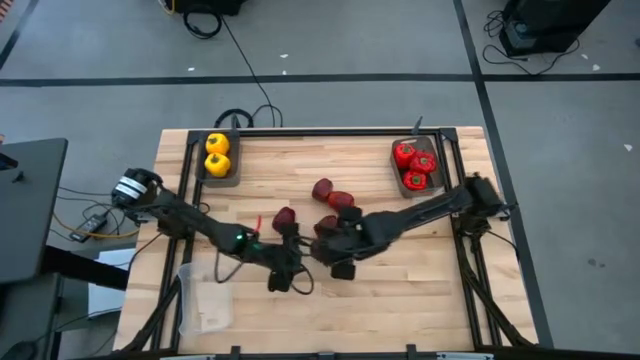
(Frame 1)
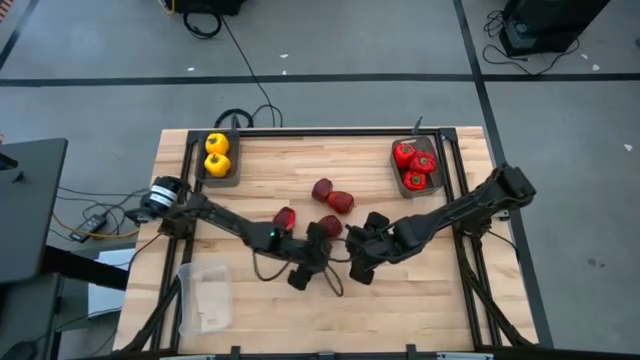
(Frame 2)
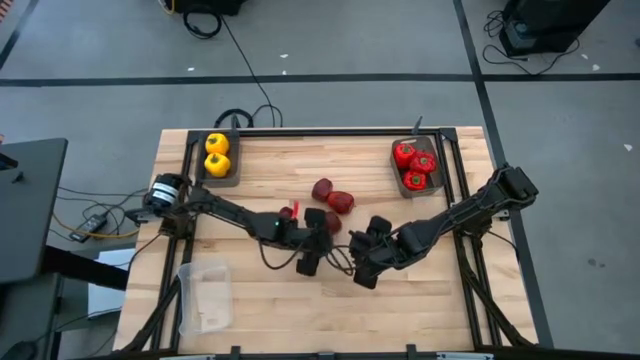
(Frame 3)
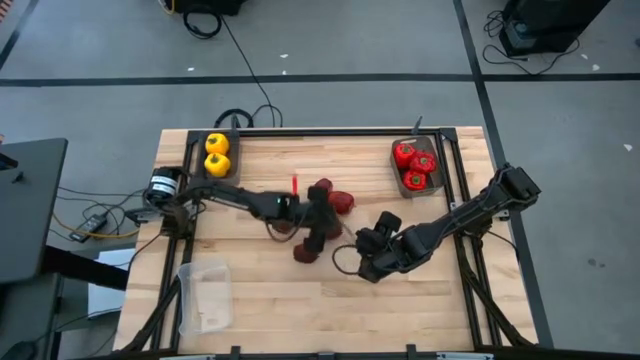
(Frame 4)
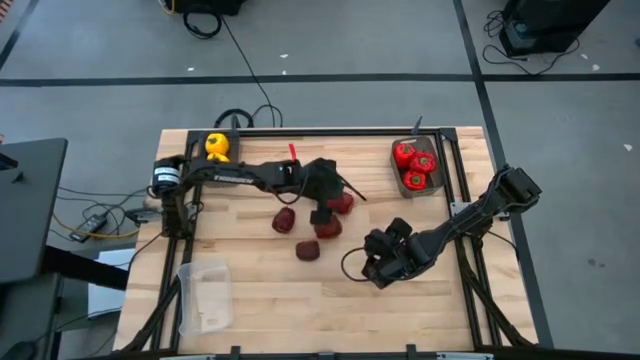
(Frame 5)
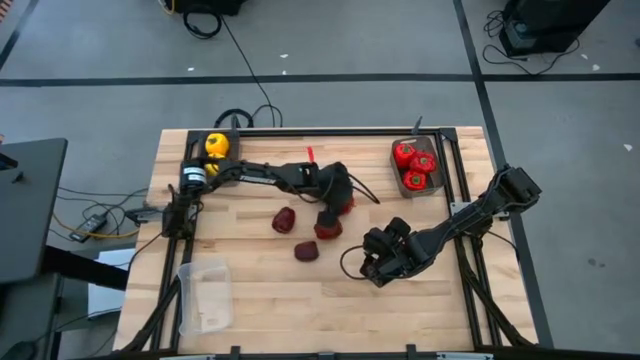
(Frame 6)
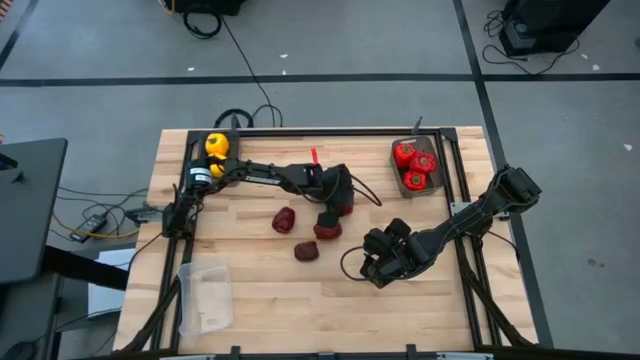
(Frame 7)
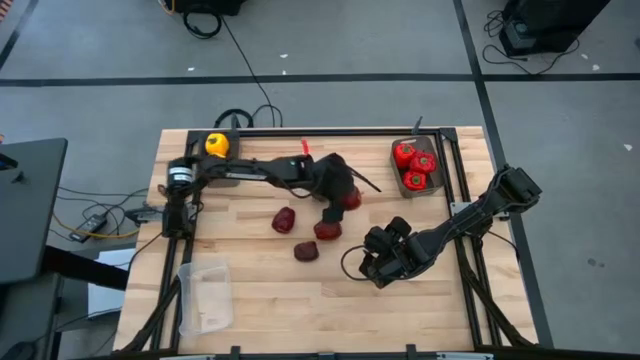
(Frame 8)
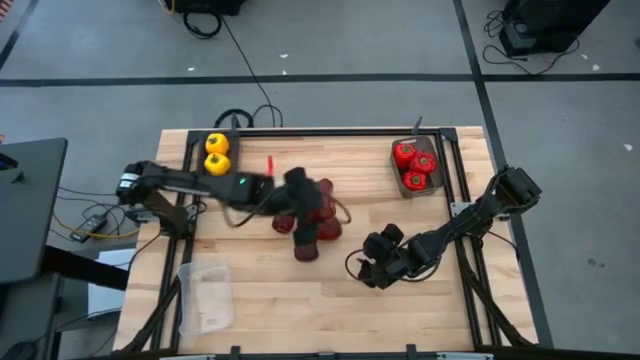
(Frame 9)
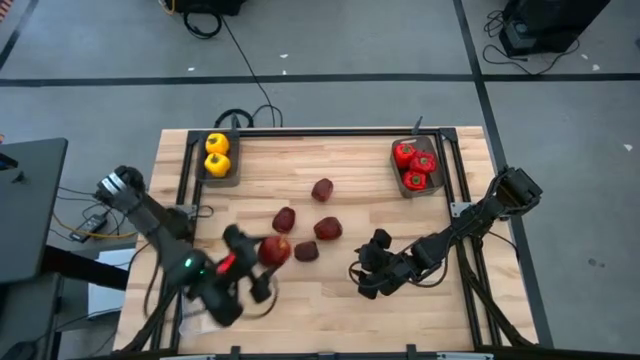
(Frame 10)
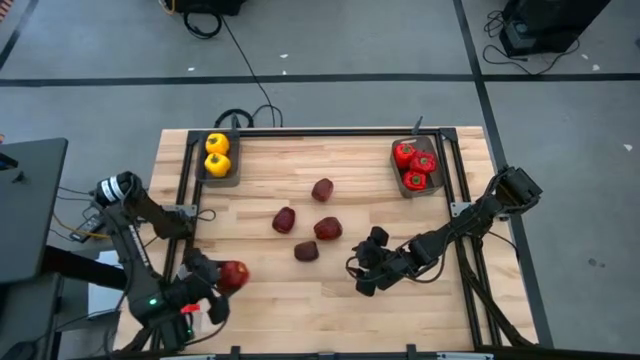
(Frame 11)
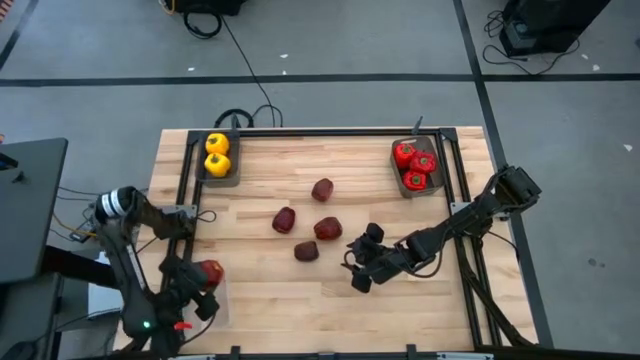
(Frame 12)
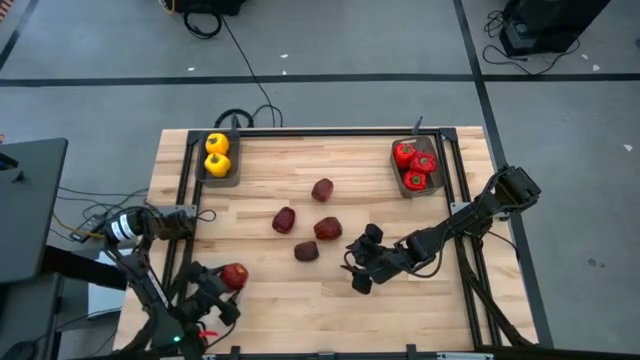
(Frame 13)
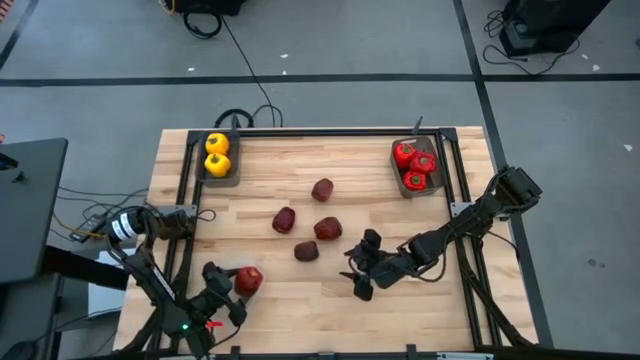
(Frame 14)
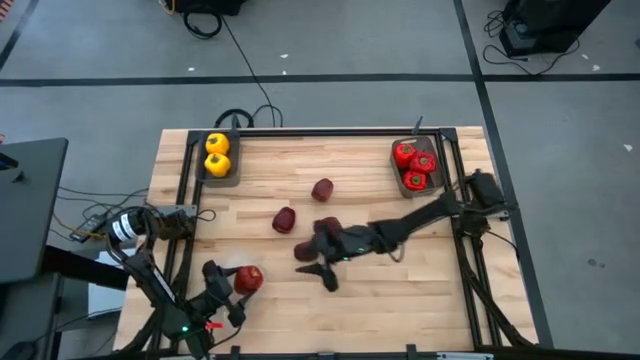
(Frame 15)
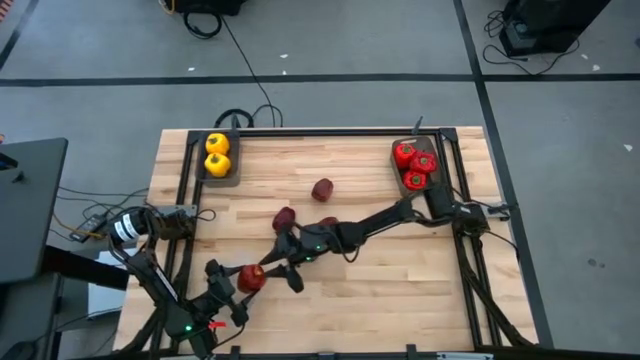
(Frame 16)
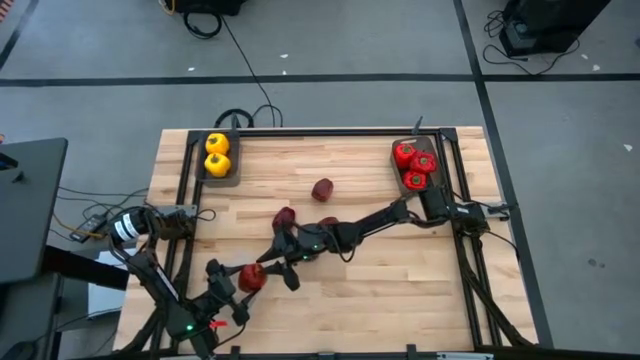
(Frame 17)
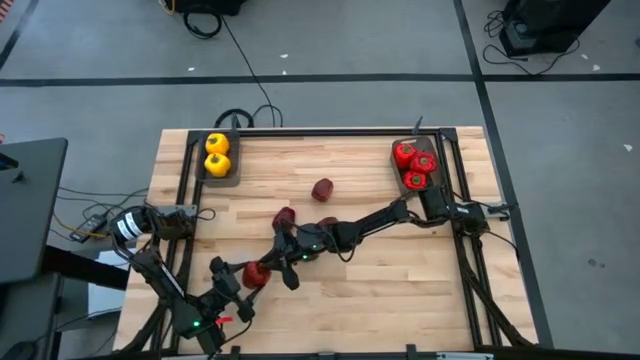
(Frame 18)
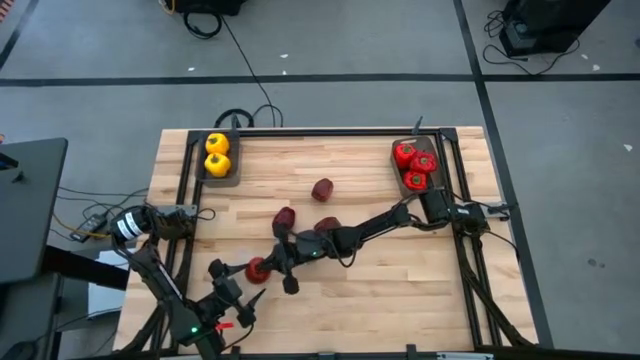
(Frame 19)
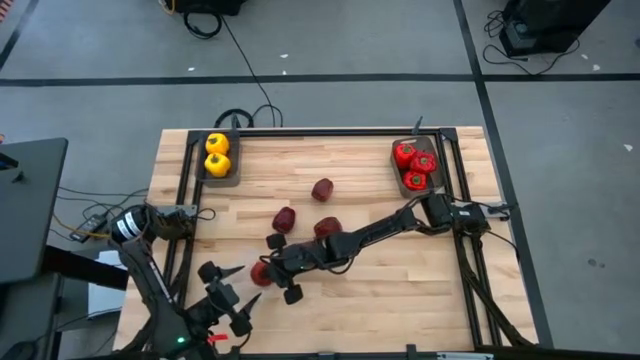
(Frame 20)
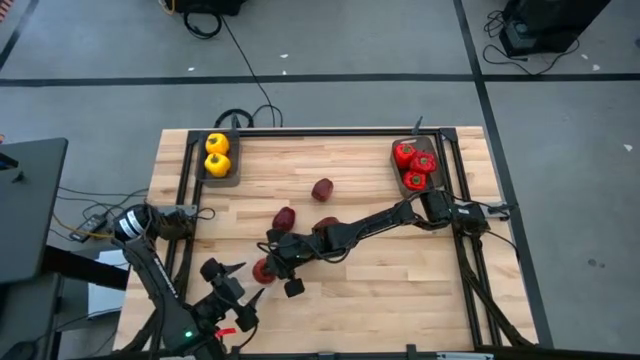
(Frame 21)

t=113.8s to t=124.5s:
Task: Sort produce into baskets
Put the red apple into the transparent bin

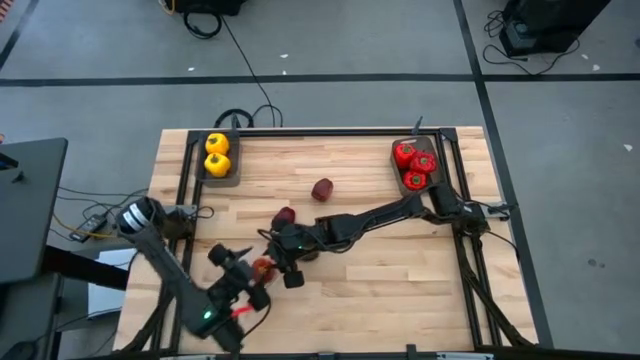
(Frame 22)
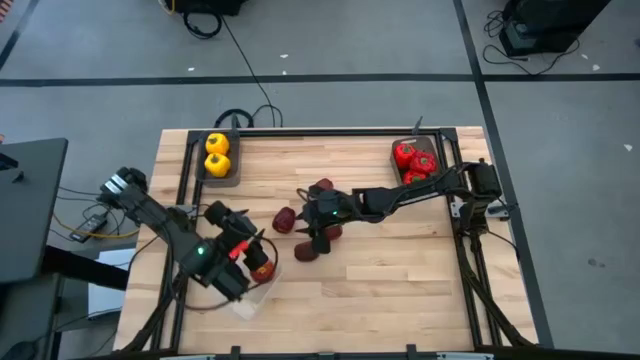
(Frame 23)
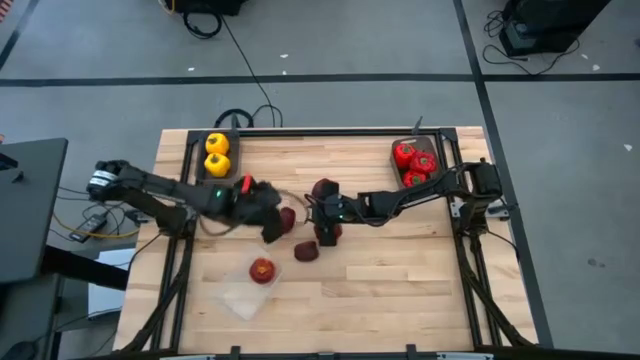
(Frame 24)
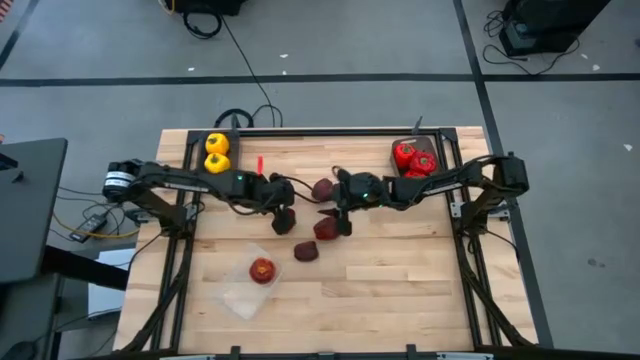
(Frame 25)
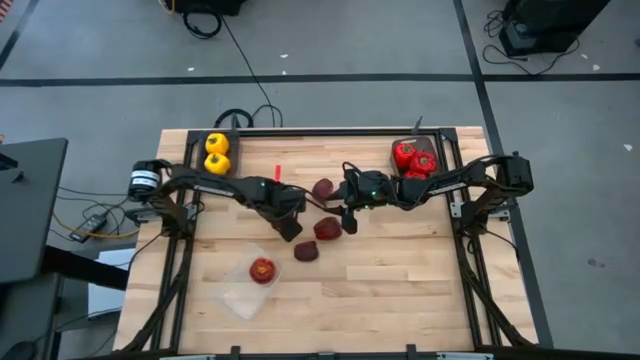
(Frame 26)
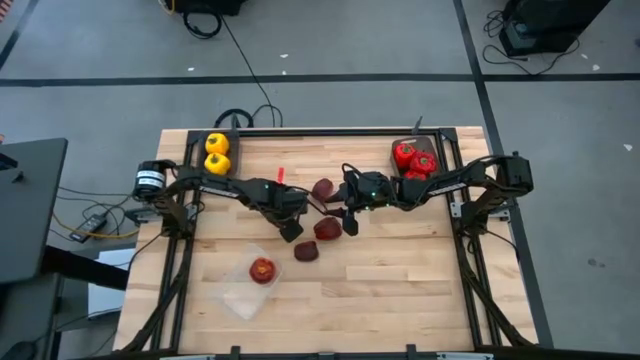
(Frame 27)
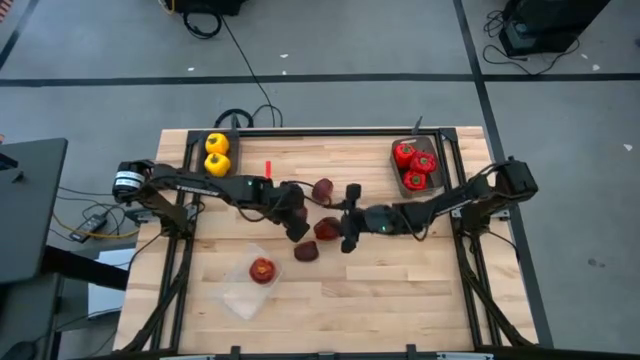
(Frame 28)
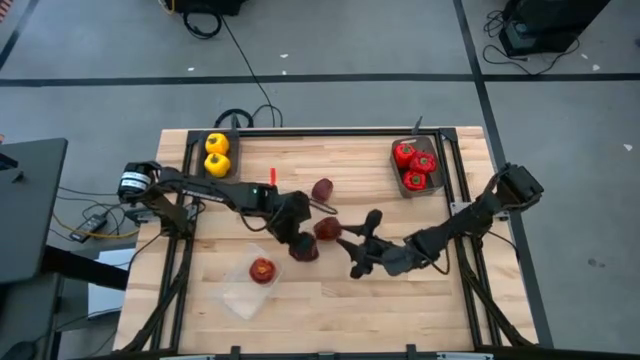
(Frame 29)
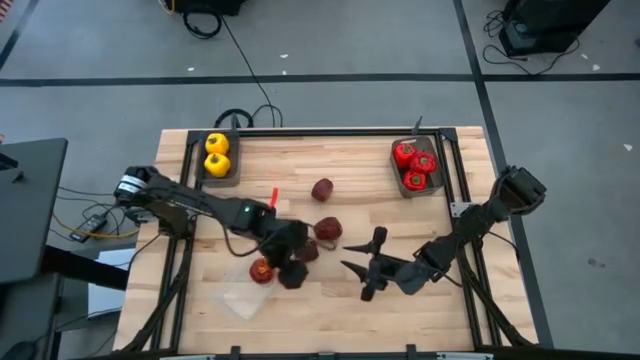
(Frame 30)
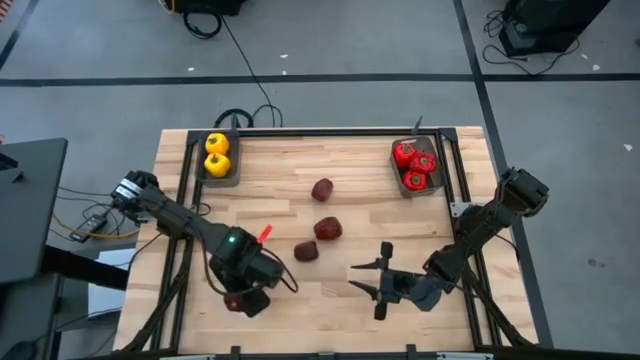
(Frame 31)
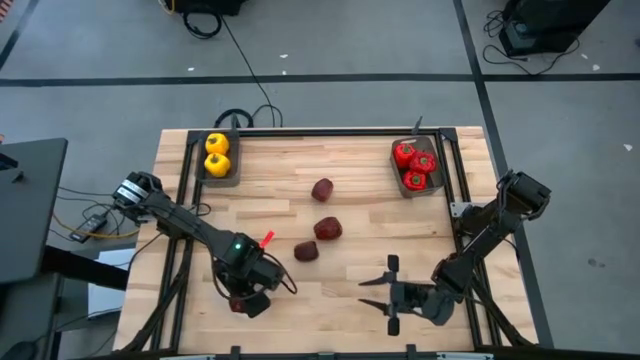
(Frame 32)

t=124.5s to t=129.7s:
Put the red apple into the transparent bin

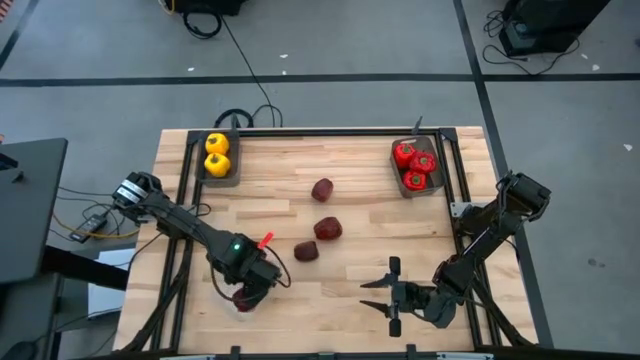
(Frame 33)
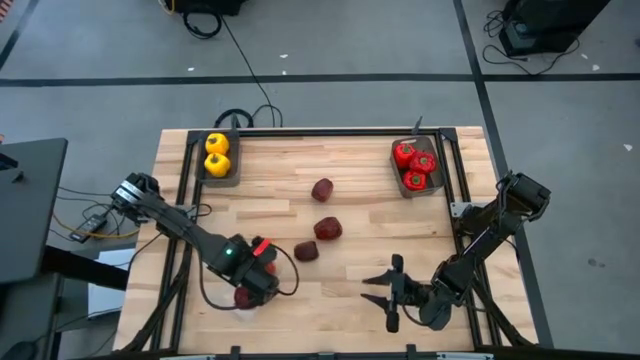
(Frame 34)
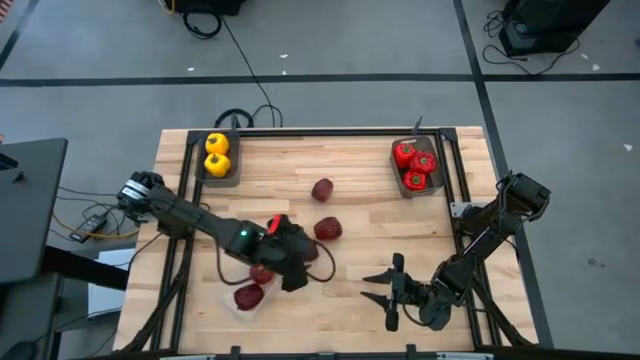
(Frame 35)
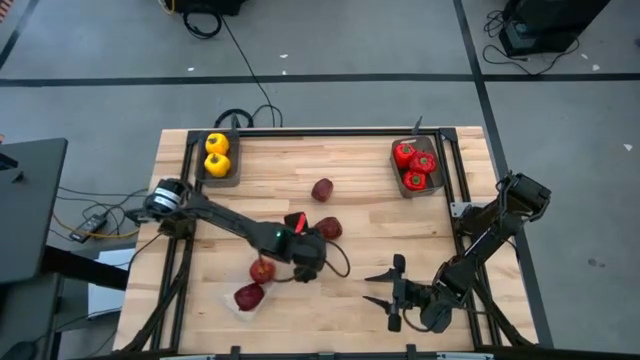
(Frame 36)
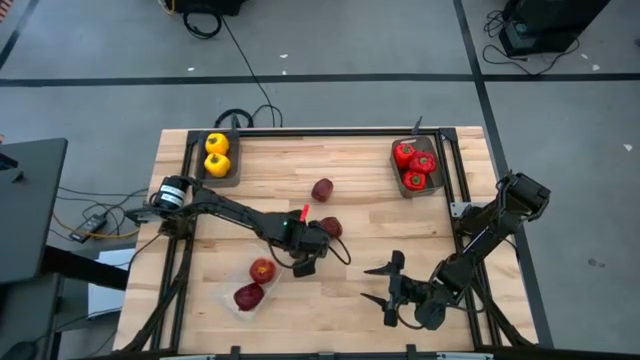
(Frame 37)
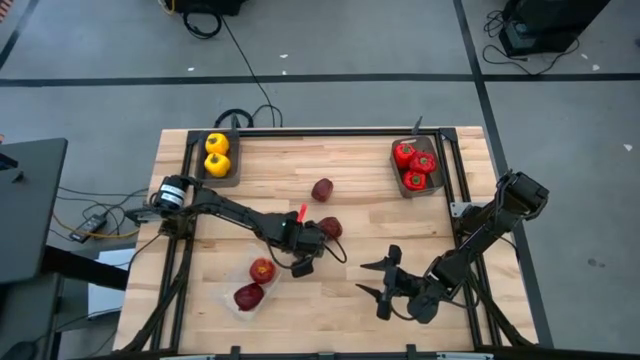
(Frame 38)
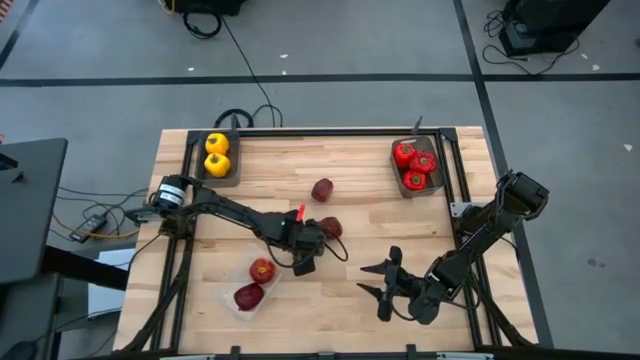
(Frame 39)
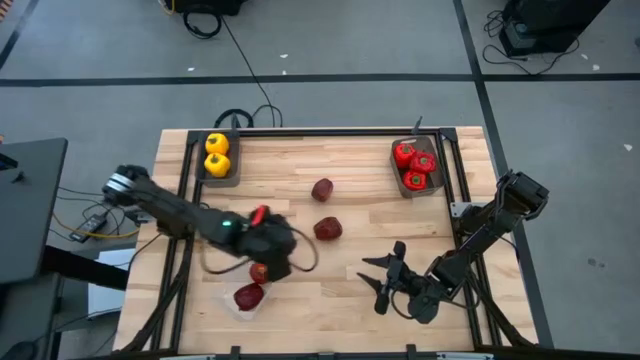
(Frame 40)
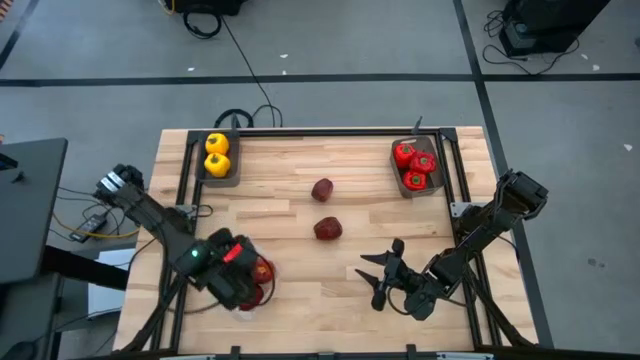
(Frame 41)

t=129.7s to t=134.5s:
Put the red apple into the transparent bin

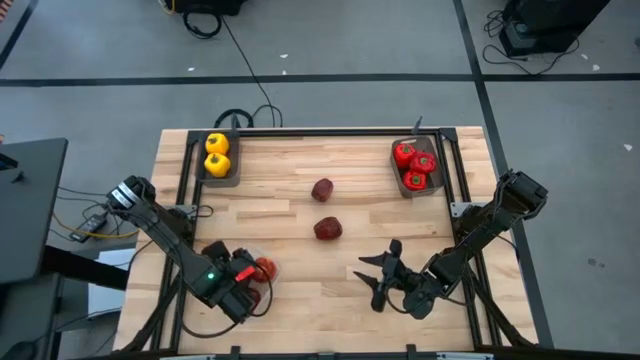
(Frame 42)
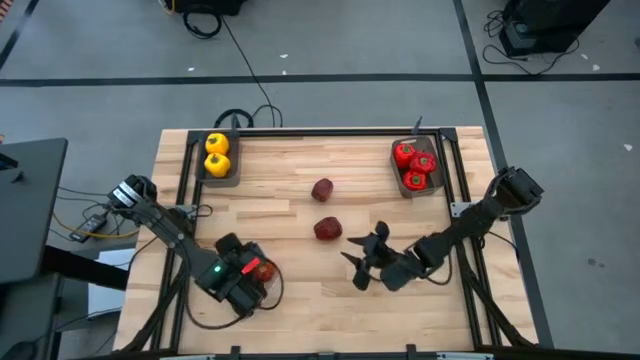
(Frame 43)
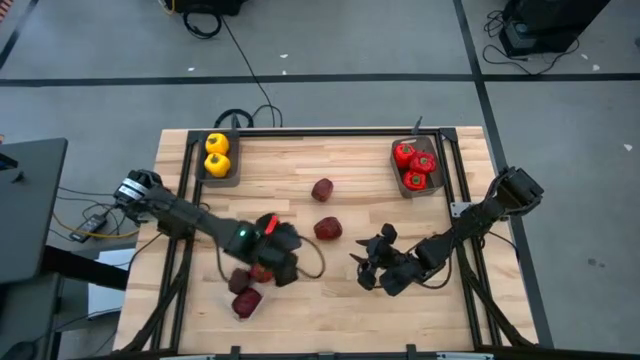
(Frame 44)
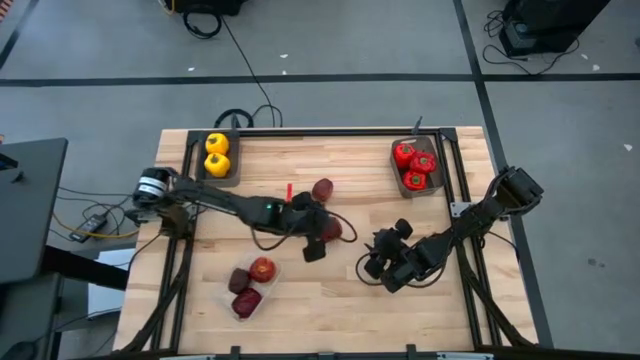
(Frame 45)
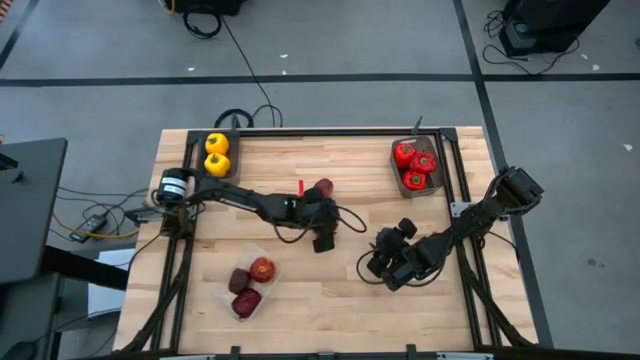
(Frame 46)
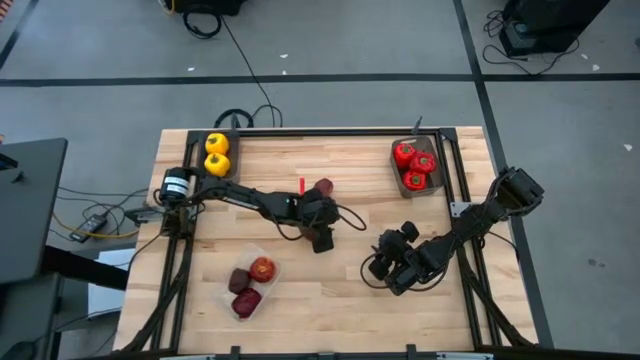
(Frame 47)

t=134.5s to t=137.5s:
Put the red apple into the transparent bin
